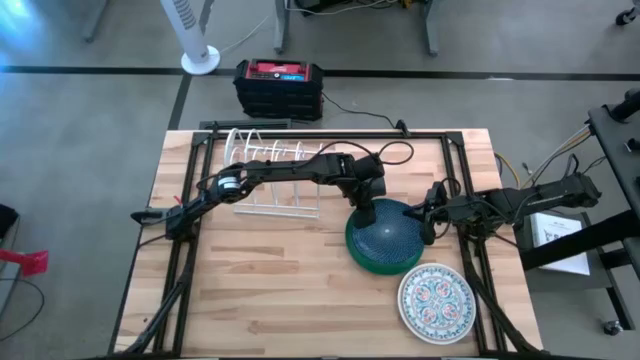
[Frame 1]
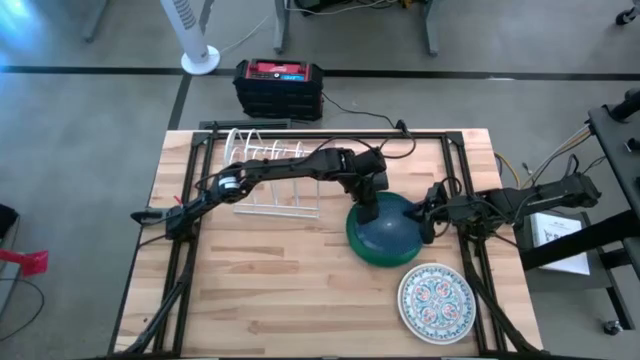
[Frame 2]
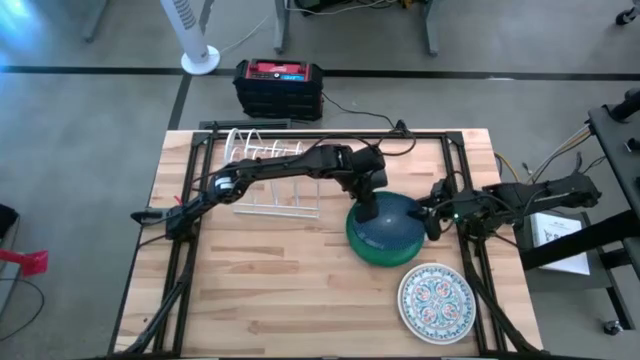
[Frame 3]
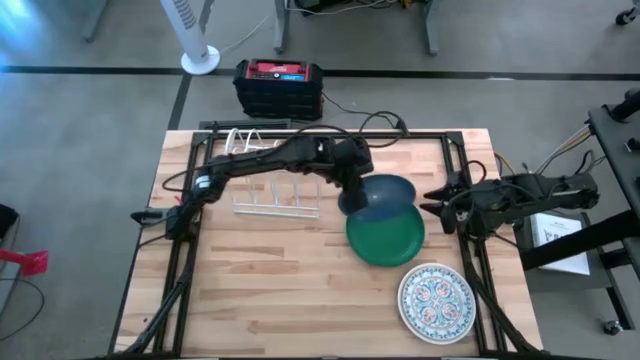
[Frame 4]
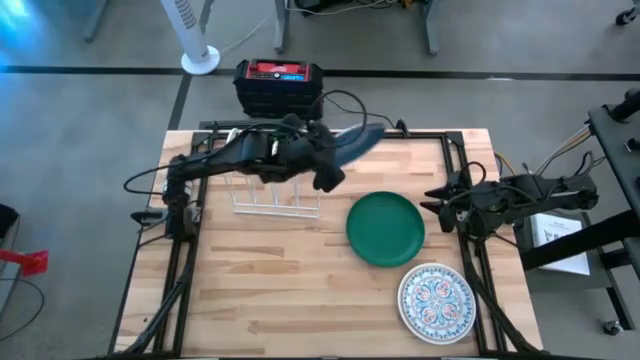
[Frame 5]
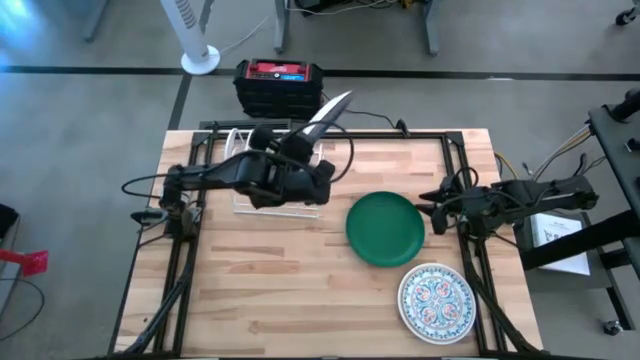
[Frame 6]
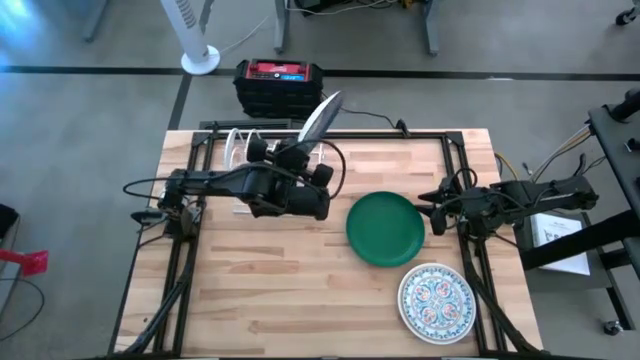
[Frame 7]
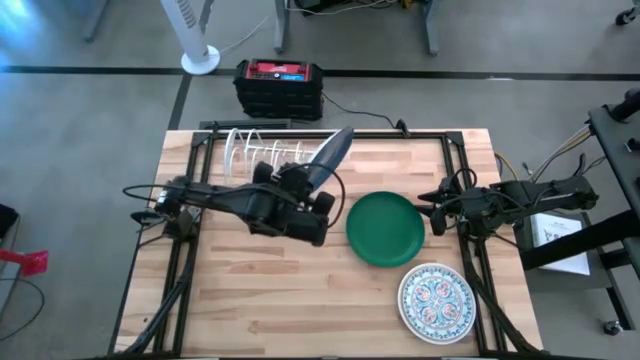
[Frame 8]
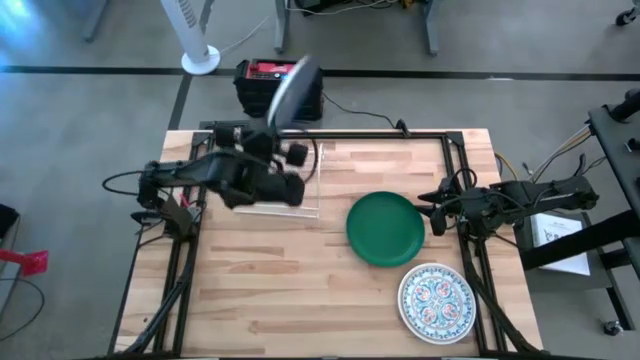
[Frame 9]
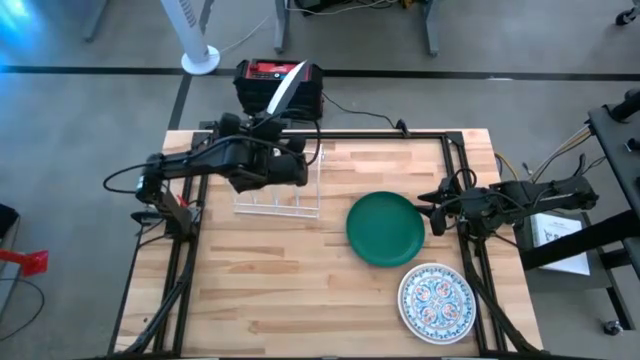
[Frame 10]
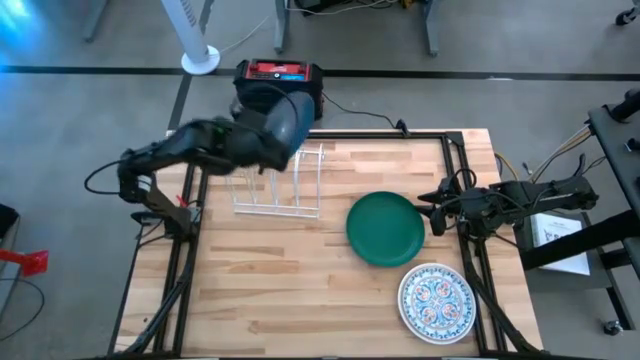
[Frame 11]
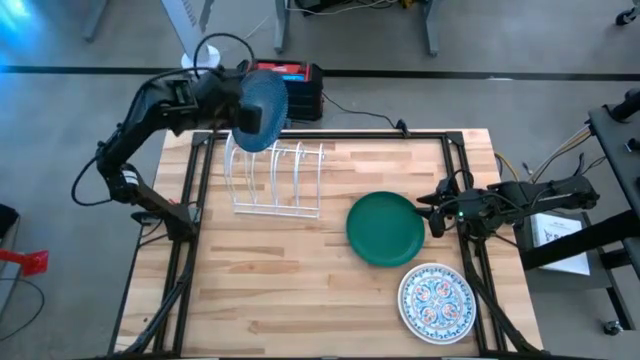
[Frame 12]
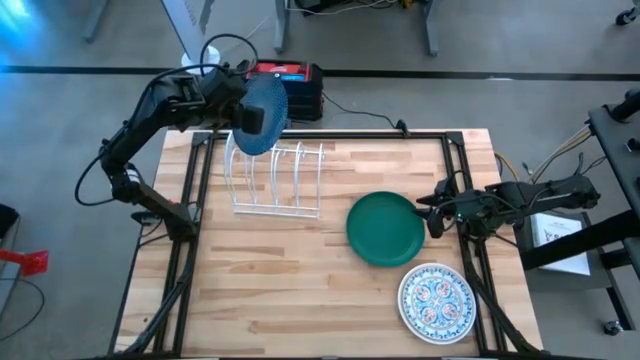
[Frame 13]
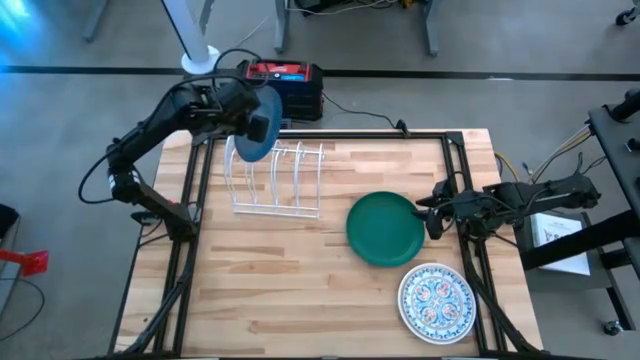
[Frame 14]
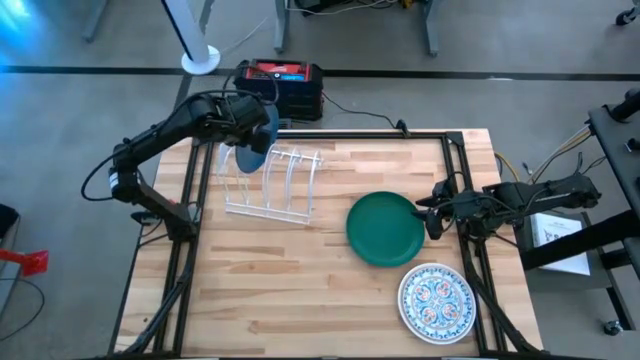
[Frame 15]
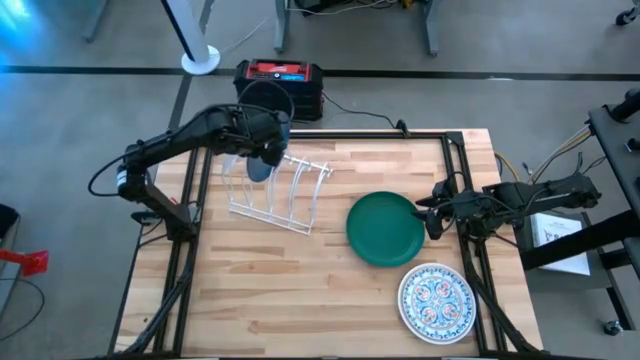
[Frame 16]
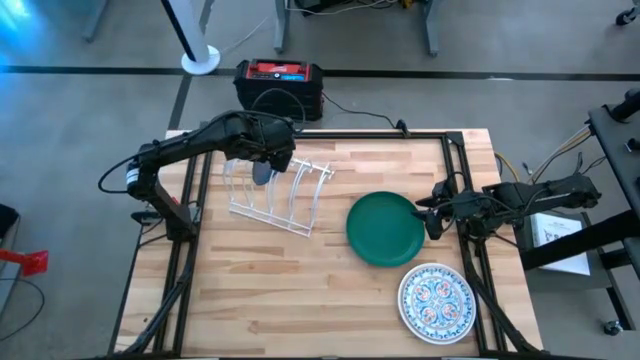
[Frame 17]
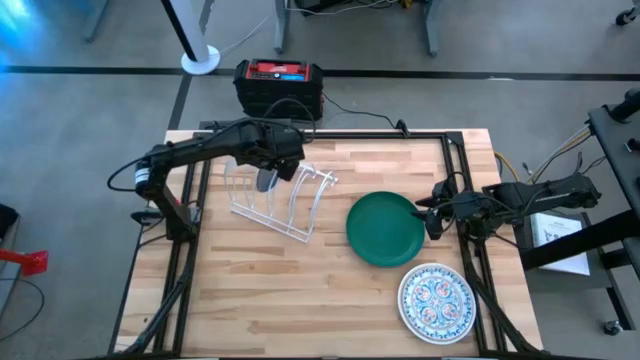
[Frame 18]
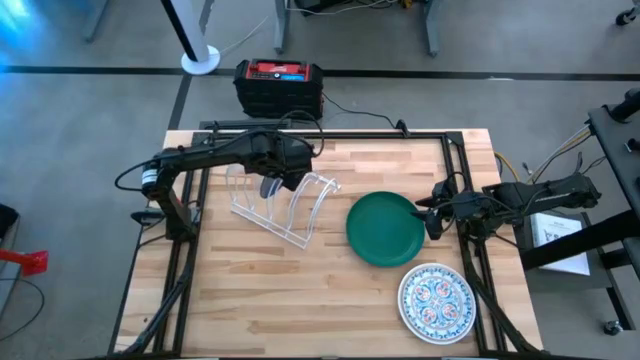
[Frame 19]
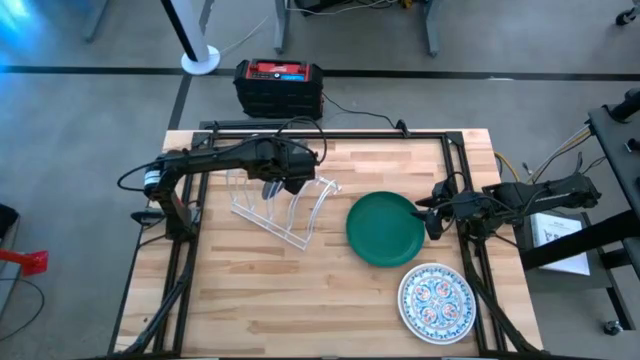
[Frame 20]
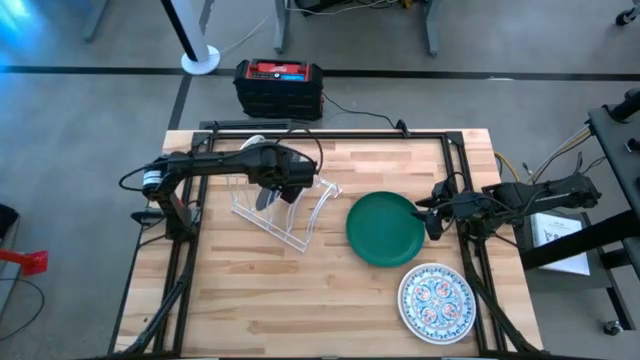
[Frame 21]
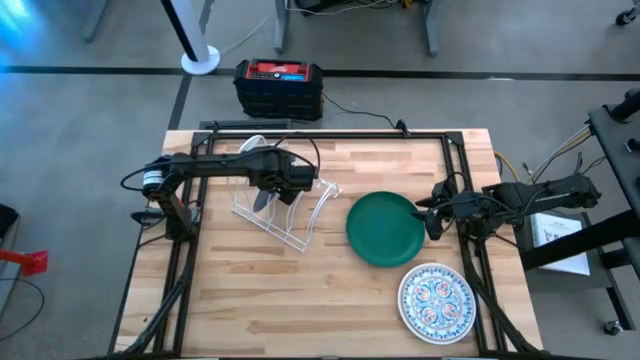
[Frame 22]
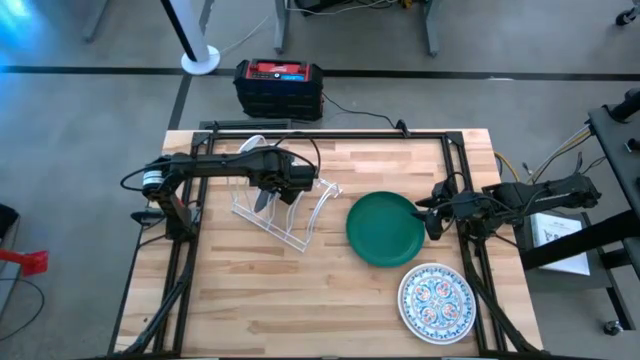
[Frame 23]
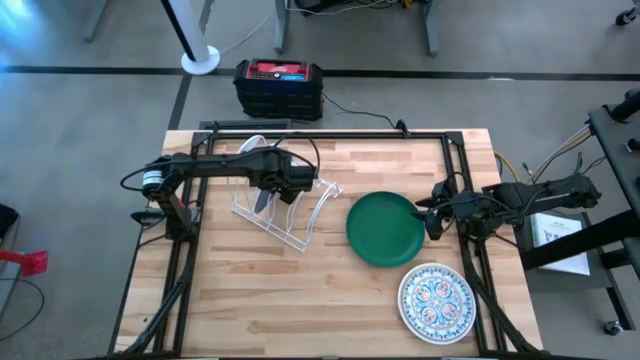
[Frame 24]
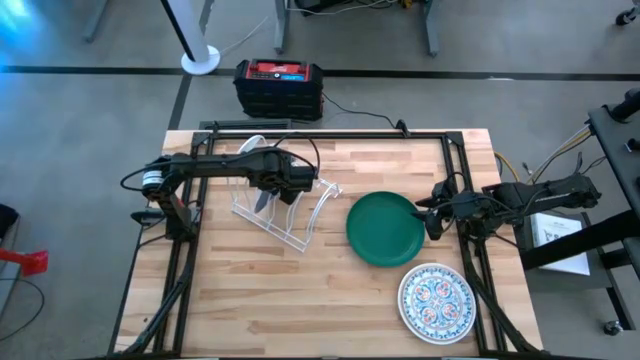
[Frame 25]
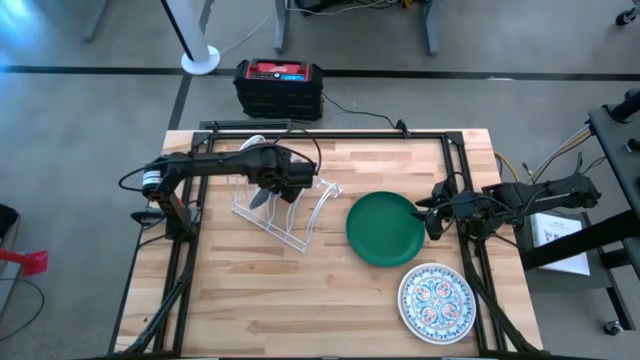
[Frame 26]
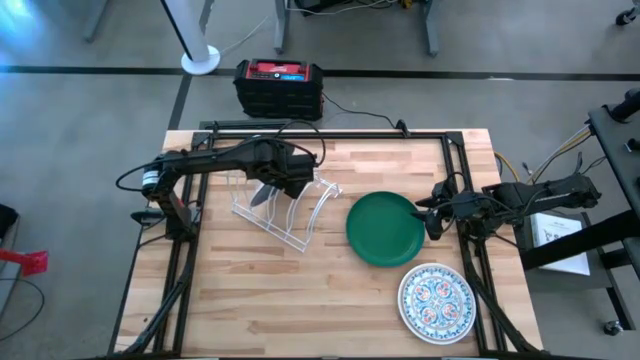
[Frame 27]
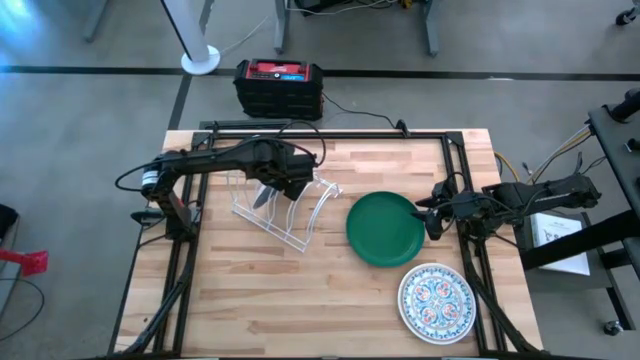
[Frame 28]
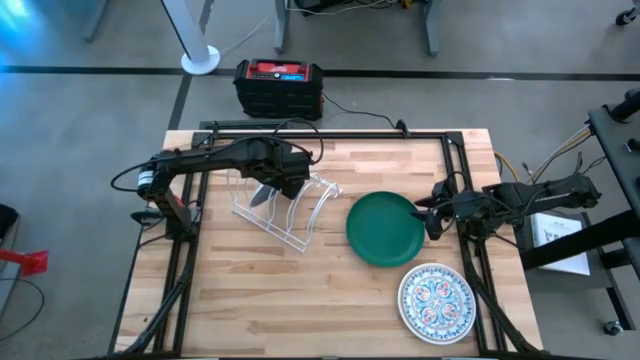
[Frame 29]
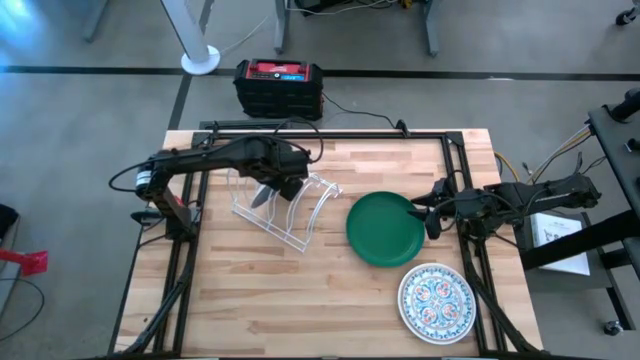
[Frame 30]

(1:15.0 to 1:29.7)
Task: Sort dishes
Put the blue patterned plate in the dish rack

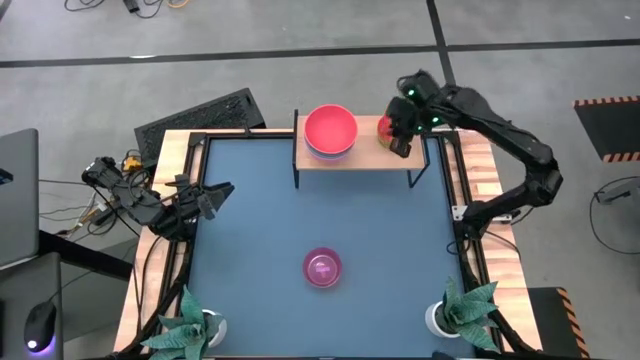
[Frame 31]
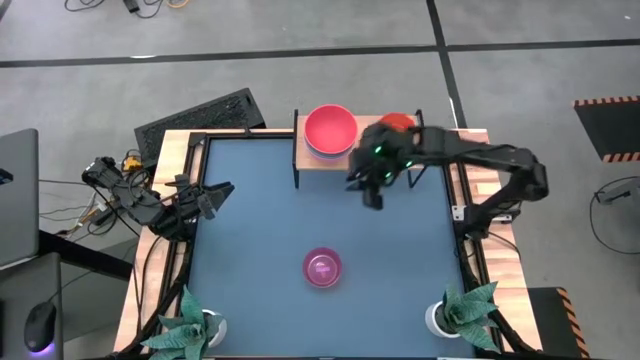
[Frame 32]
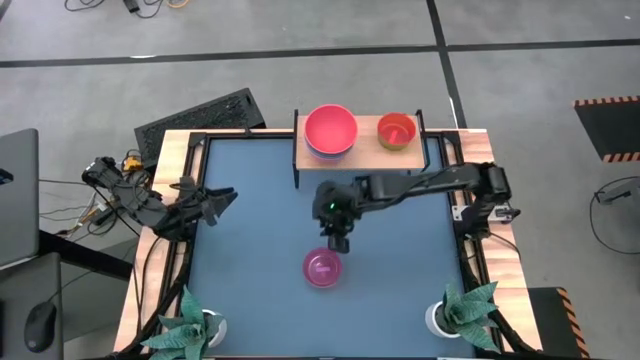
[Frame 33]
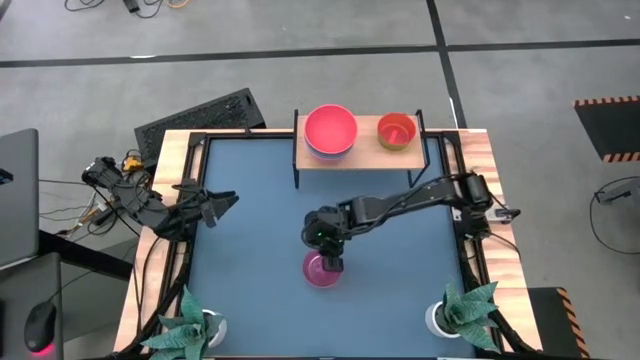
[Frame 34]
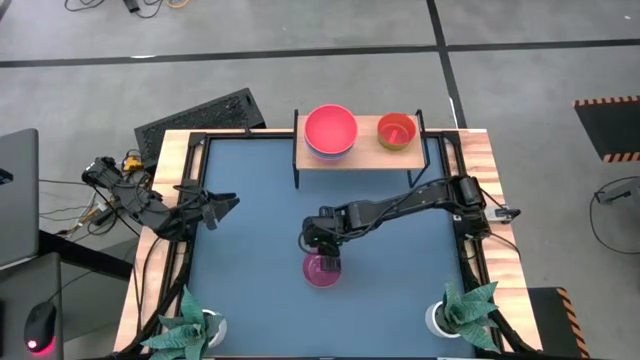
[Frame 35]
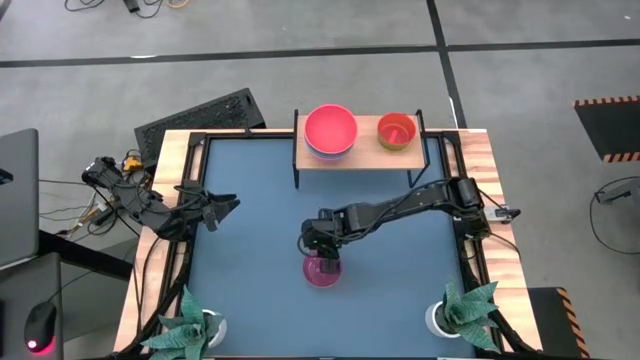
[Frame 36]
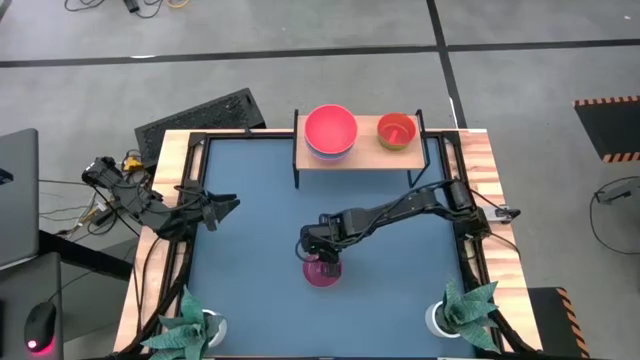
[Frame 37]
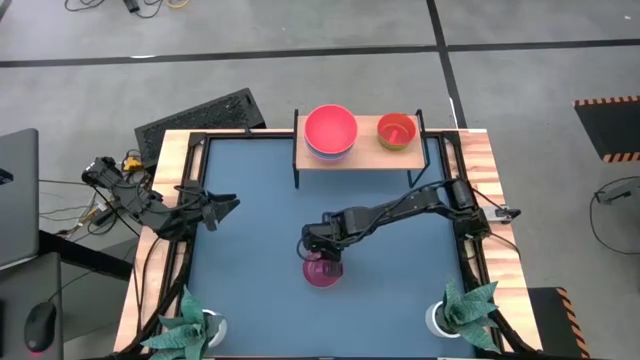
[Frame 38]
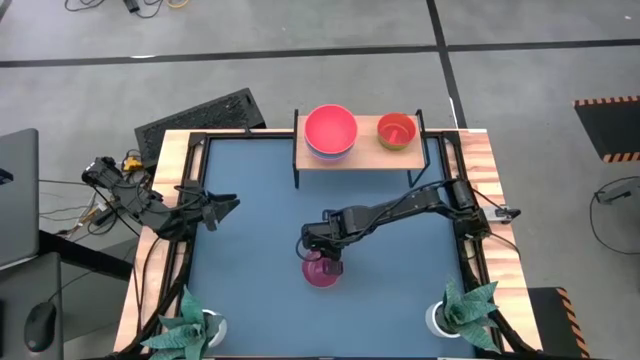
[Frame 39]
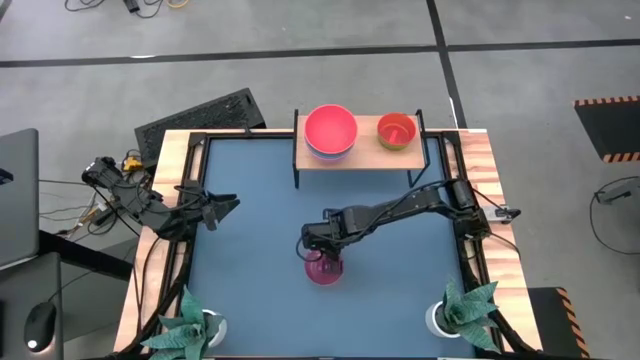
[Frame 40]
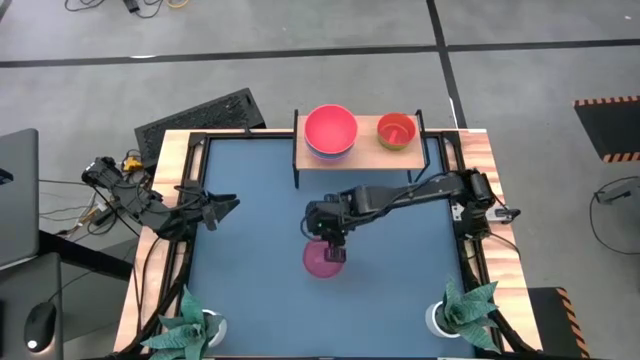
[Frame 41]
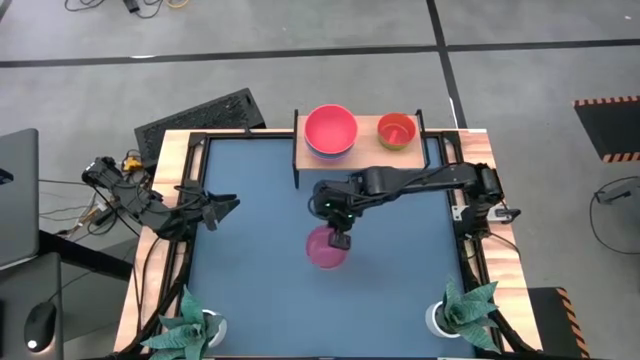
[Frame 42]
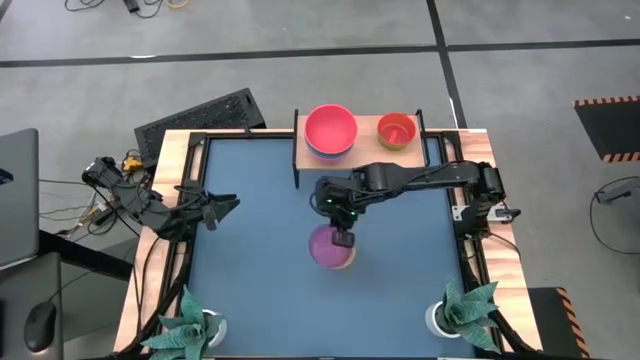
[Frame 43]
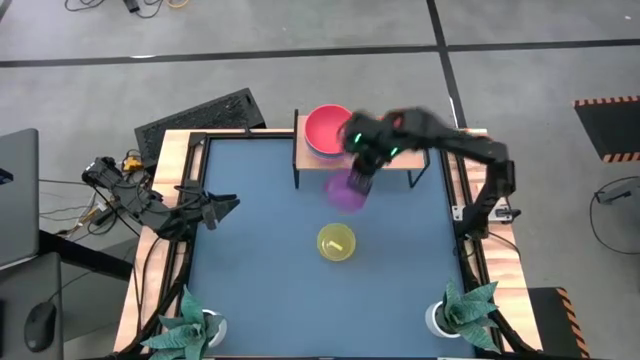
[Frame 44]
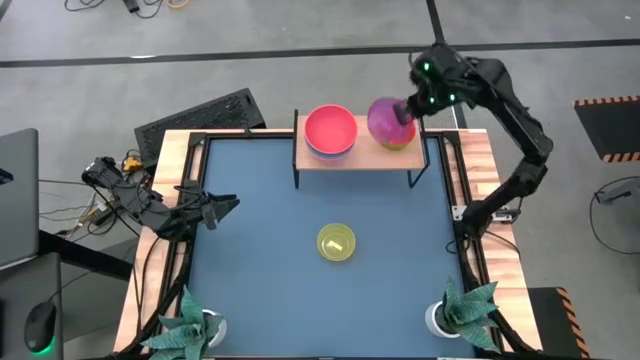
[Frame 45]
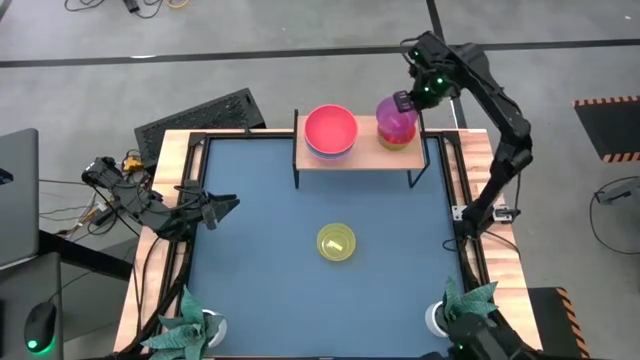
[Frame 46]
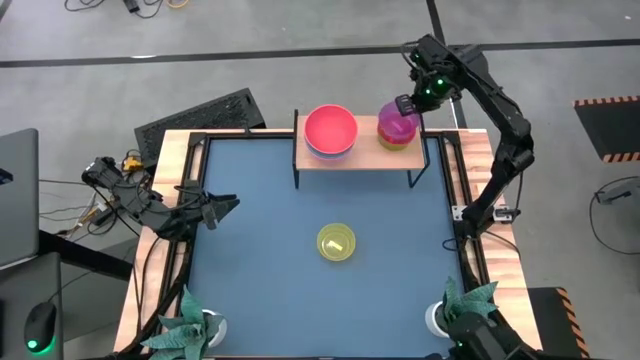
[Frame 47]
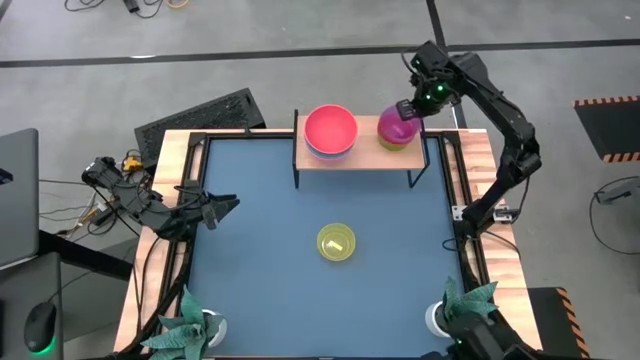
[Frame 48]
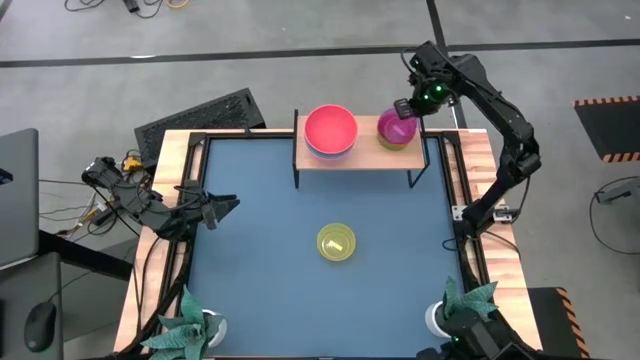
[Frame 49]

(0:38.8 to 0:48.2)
Task: Place and stack bowls onto a shelf
Stack the small violet bowl on the small orange bowl on the shelf
